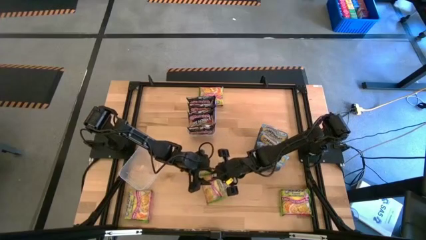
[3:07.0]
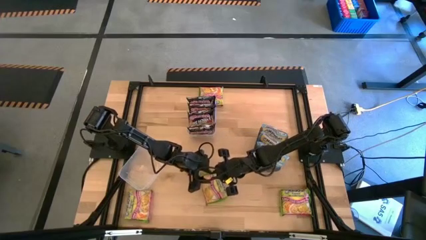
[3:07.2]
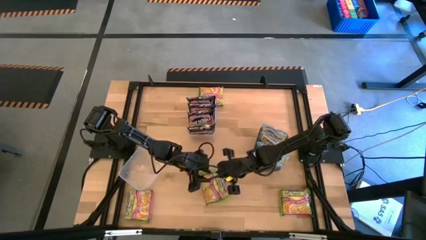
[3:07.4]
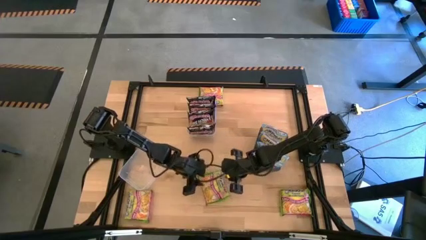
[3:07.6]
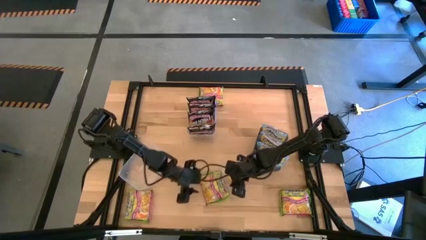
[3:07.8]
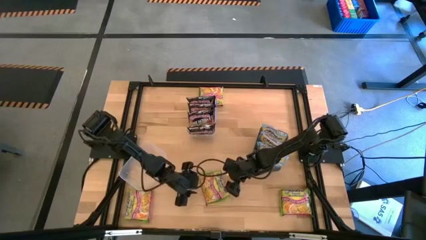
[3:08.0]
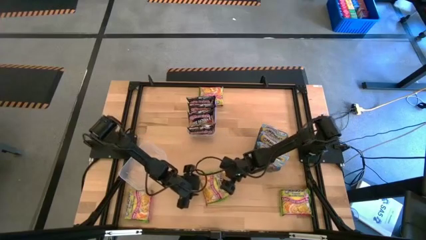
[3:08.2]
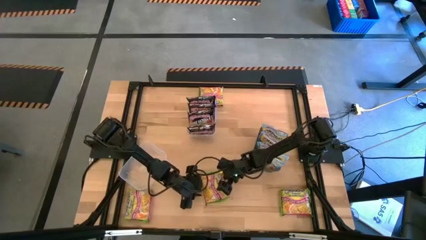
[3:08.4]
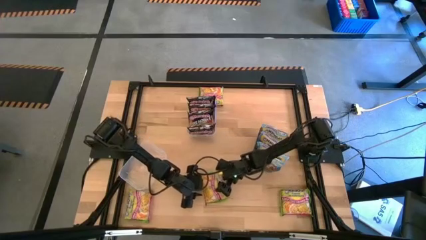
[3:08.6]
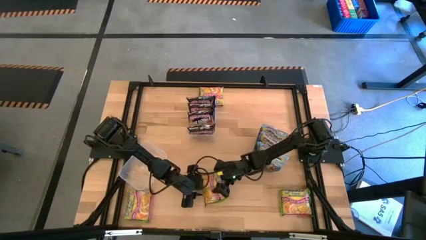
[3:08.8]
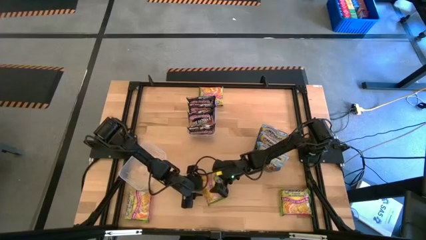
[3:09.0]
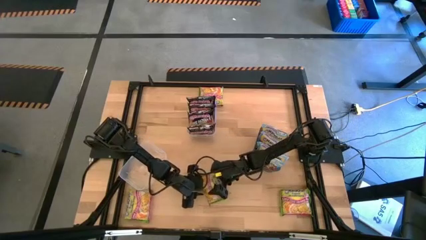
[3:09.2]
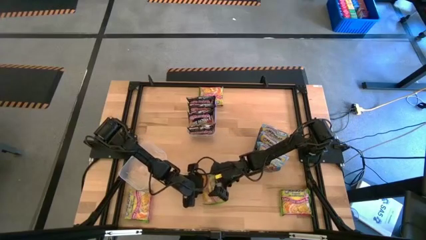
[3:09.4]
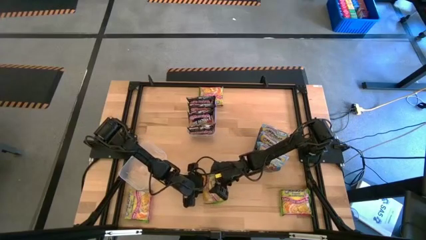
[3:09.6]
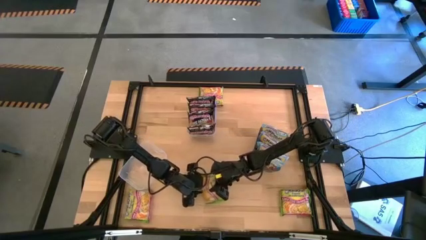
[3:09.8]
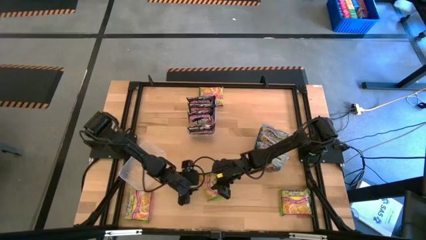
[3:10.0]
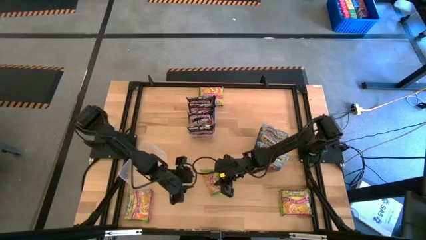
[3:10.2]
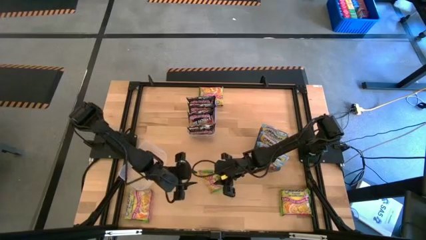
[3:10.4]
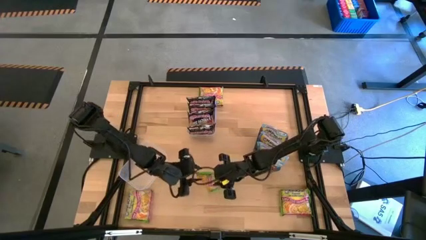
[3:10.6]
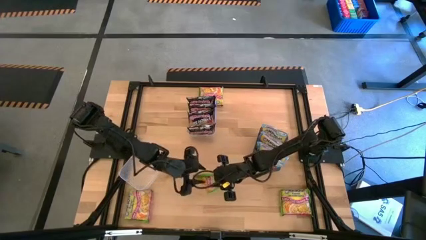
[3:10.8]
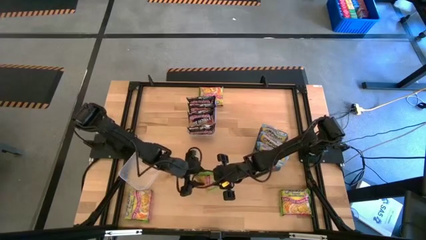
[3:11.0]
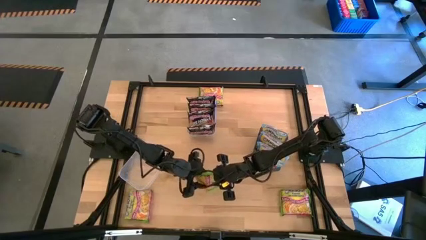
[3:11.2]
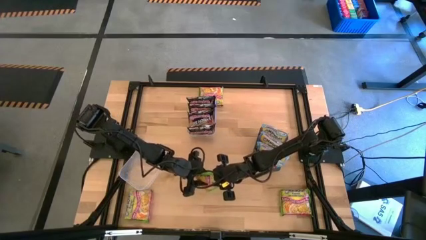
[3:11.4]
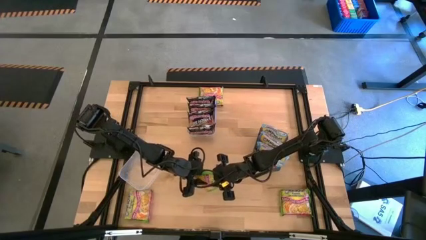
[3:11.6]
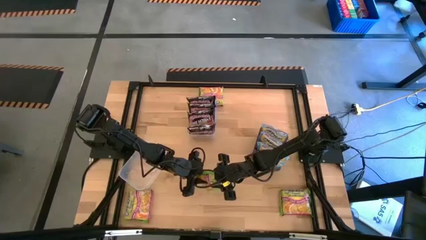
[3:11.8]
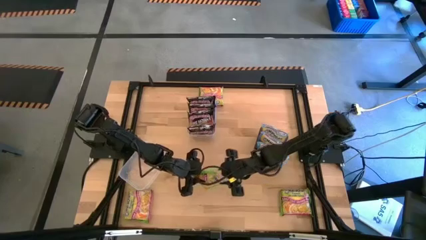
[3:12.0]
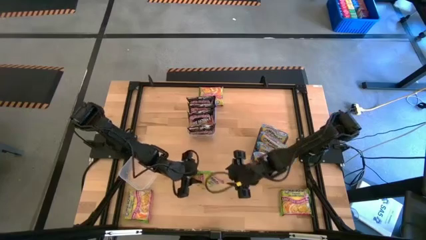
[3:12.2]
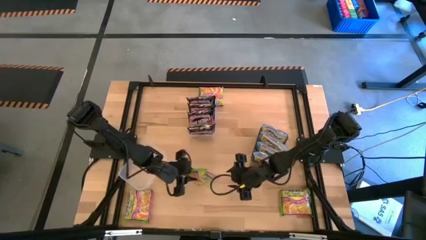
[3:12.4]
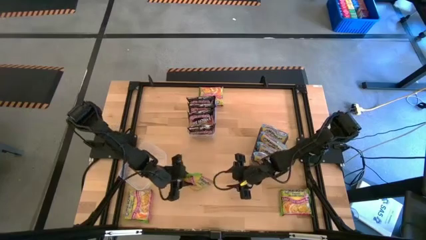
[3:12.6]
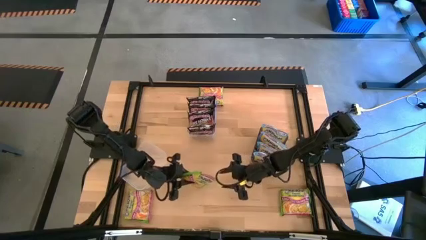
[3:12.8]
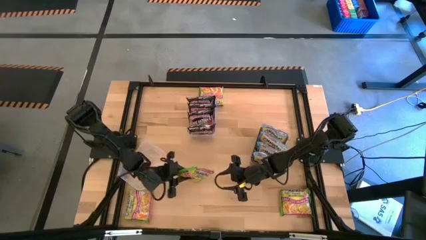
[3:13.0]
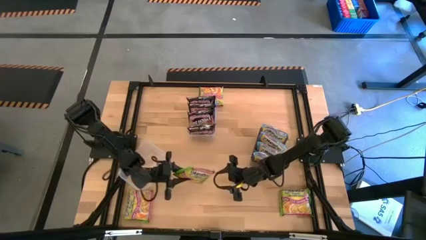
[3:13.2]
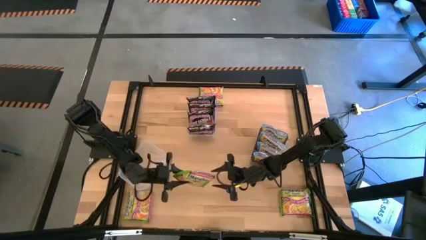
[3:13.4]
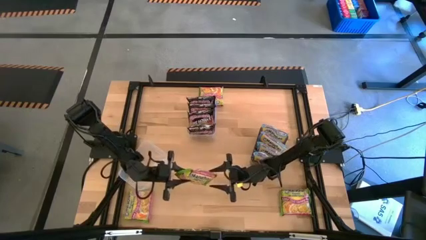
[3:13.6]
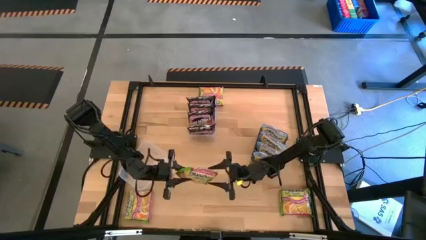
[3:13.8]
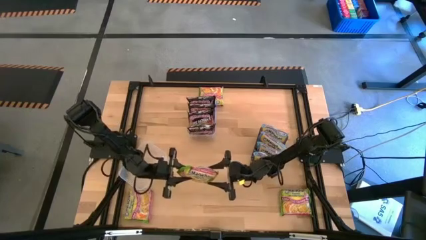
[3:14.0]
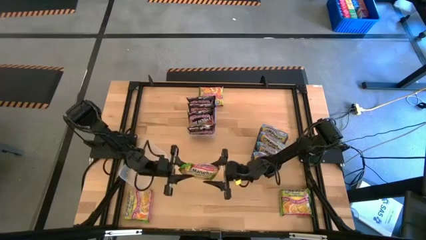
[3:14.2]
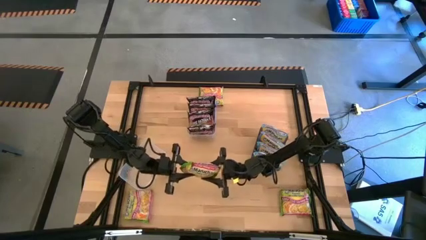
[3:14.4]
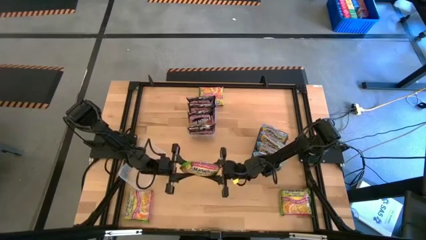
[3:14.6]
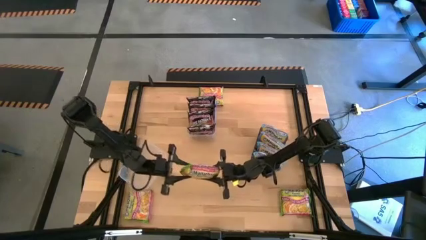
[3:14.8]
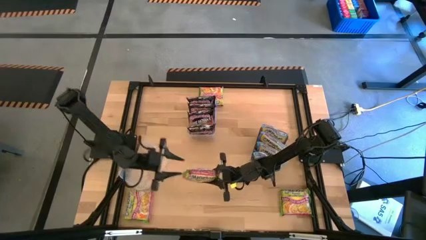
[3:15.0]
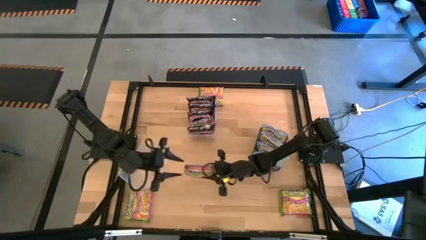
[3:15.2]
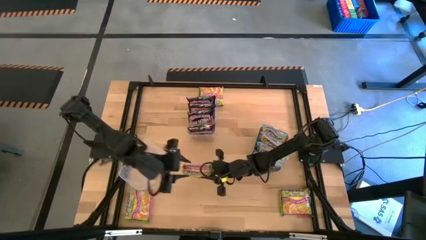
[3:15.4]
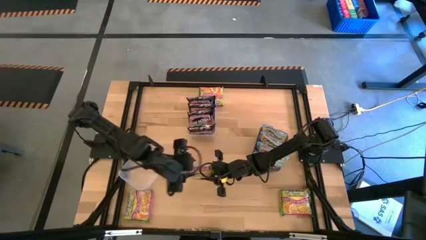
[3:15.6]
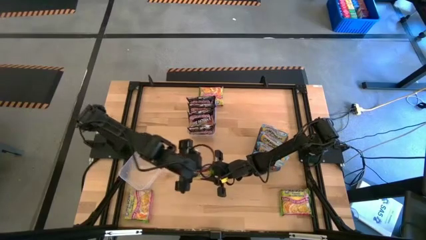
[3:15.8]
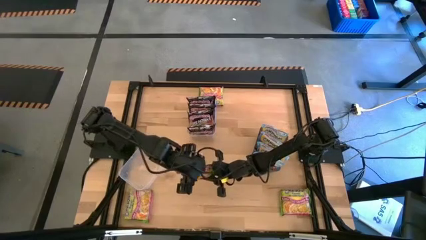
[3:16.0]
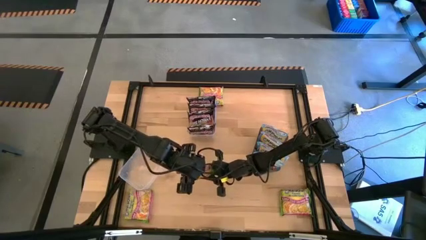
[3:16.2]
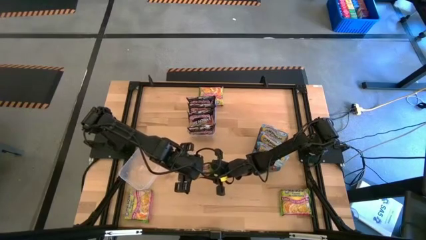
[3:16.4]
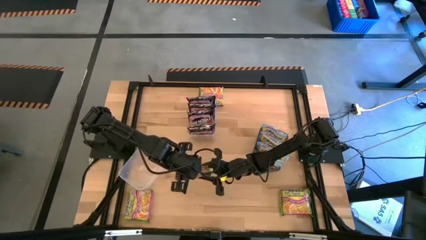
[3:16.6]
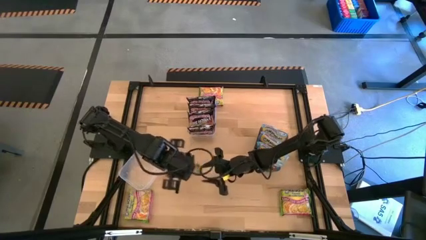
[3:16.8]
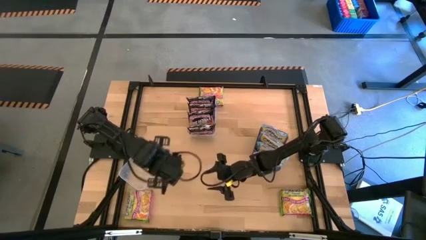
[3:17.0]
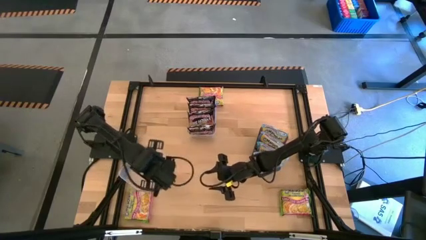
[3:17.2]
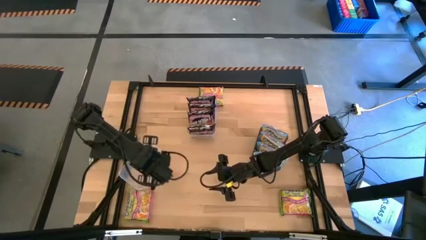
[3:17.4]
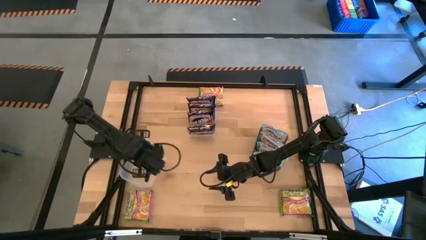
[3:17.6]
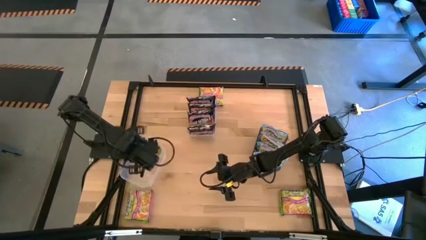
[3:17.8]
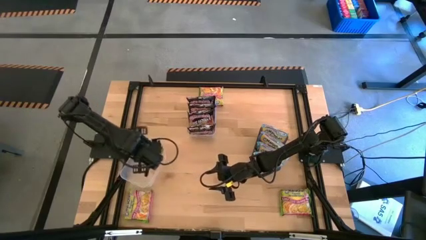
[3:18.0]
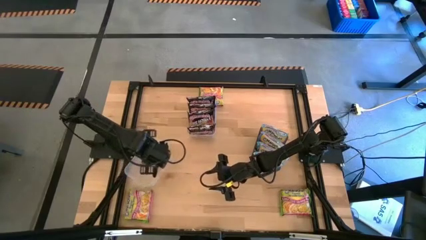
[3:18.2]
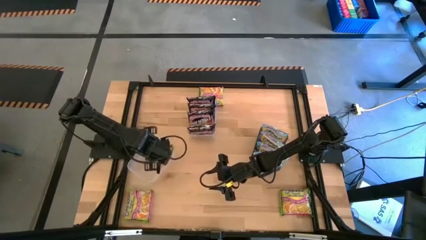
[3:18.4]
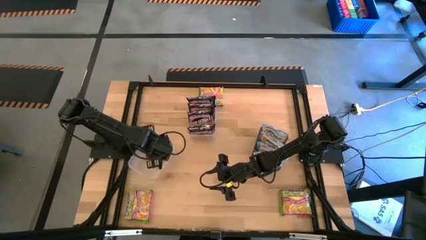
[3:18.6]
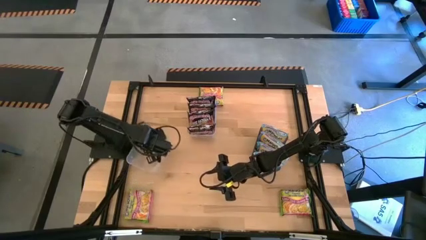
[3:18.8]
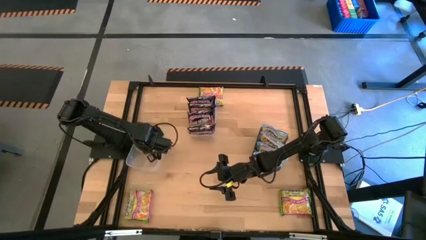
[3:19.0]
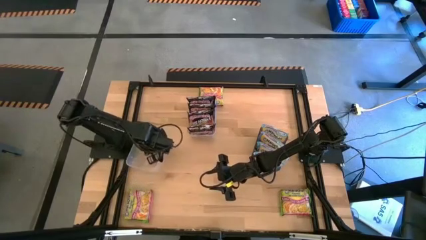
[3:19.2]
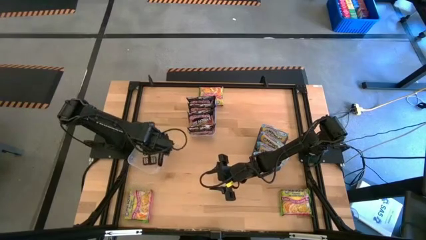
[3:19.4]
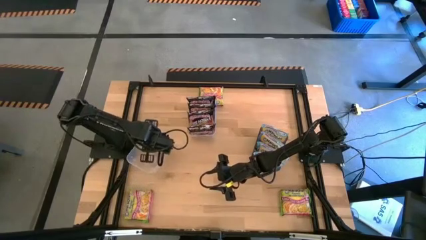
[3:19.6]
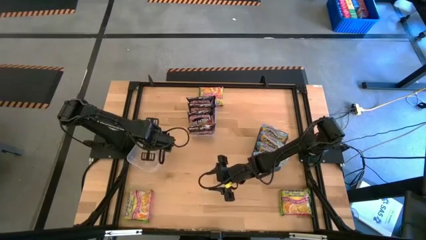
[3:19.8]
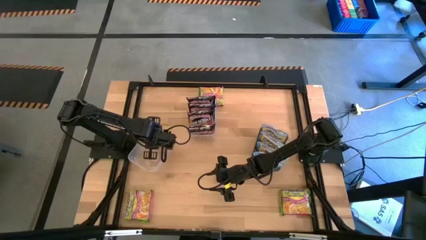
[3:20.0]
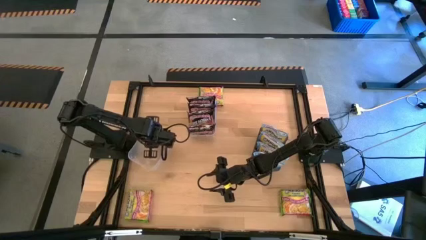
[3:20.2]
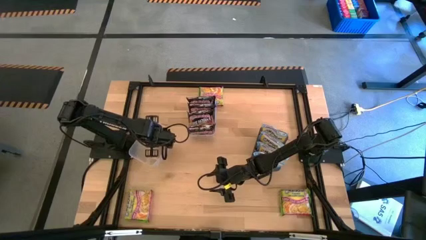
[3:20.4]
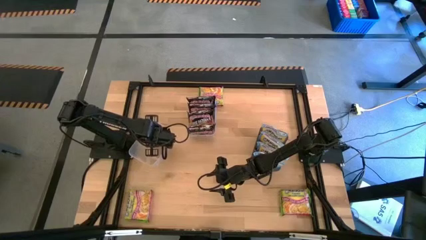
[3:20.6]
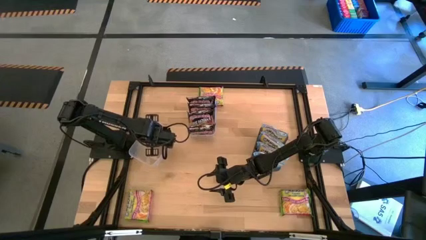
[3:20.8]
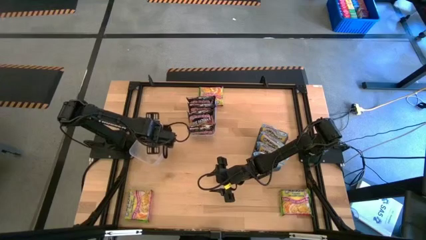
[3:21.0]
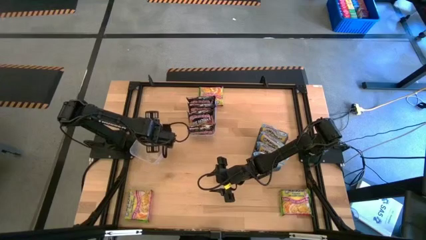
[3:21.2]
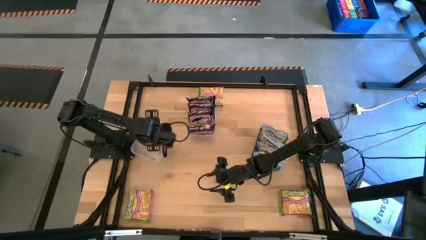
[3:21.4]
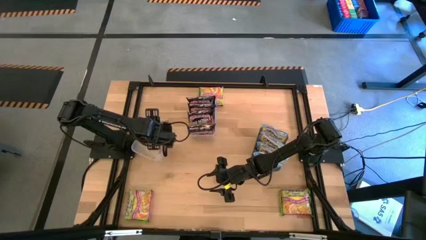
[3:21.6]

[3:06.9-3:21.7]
Task: Sort Maruchan noodles
Put the green noodle pack into the left transparent bin

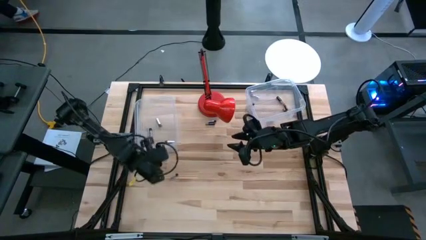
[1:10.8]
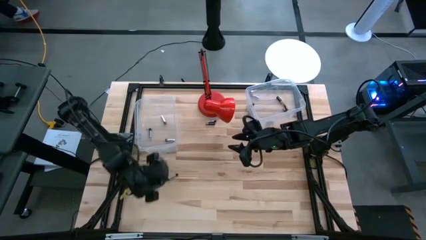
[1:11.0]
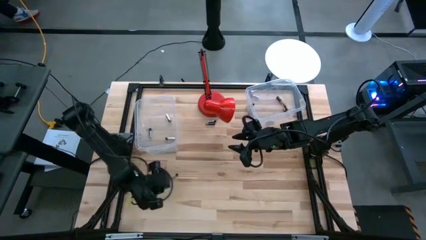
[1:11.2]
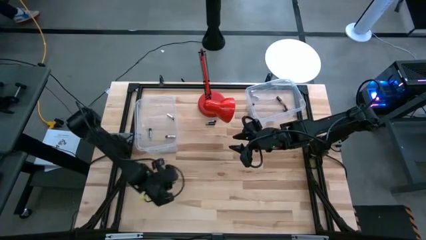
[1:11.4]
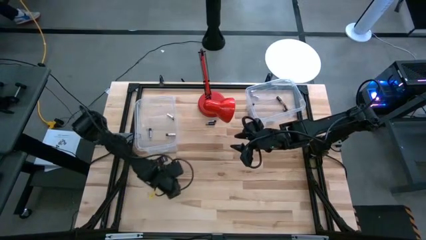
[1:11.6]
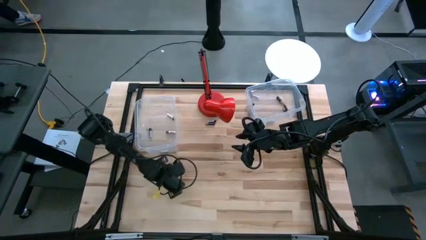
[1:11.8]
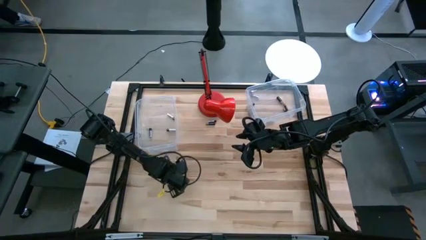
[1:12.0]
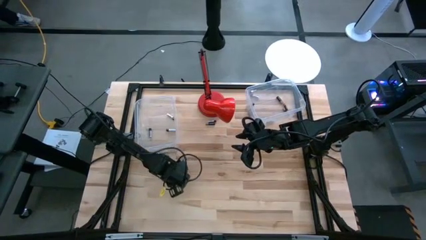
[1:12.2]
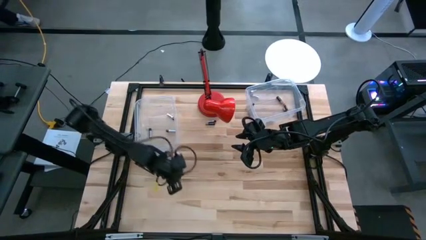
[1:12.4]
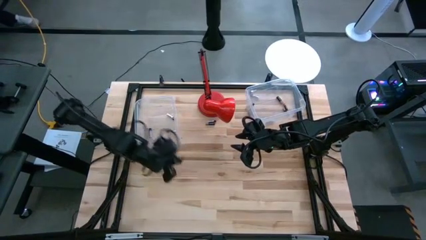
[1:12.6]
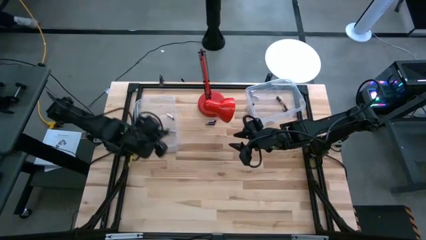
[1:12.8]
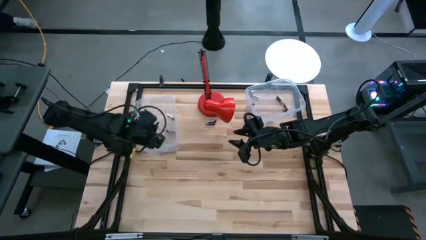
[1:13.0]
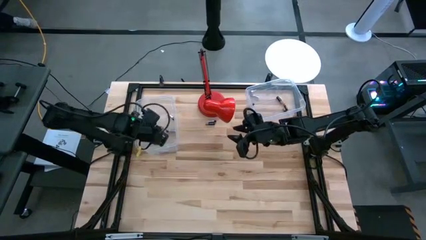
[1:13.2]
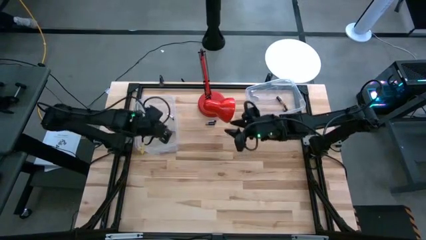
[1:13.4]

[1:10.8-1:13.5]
Task: Sort batteries
Put the silver battery into the left transparent bin
